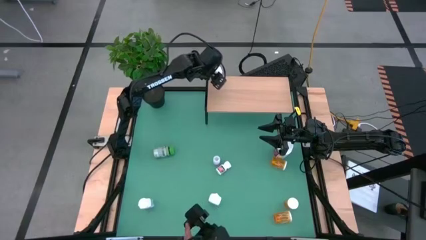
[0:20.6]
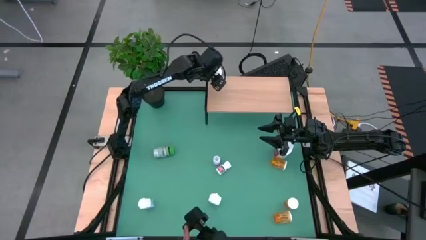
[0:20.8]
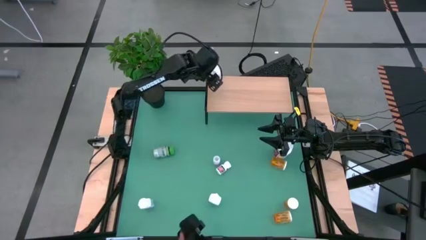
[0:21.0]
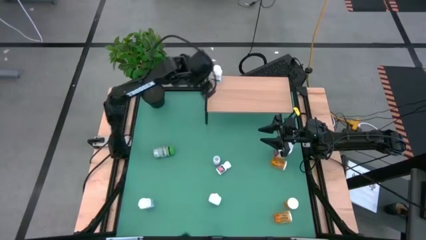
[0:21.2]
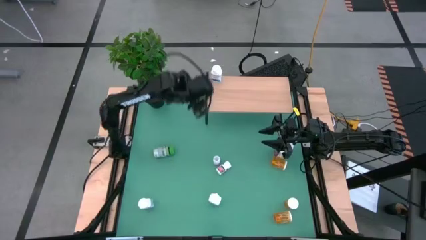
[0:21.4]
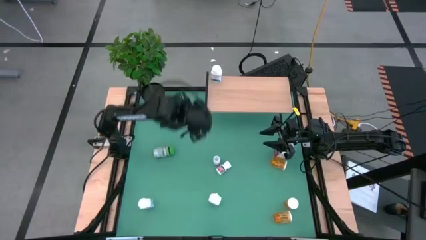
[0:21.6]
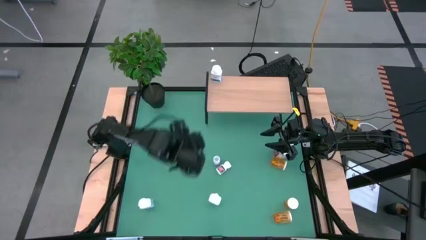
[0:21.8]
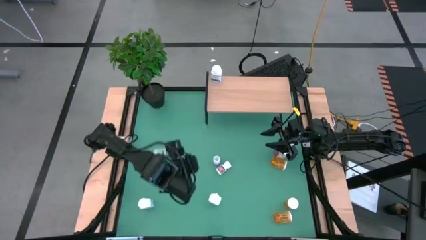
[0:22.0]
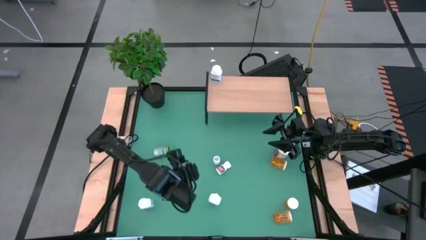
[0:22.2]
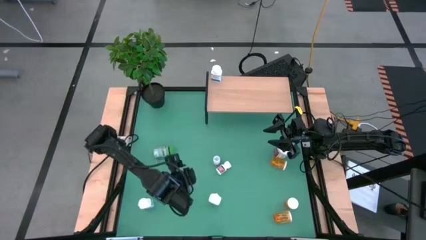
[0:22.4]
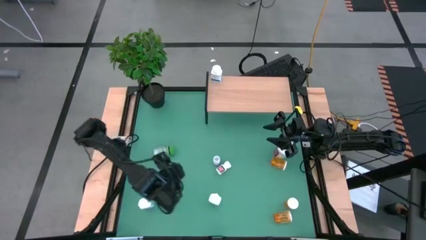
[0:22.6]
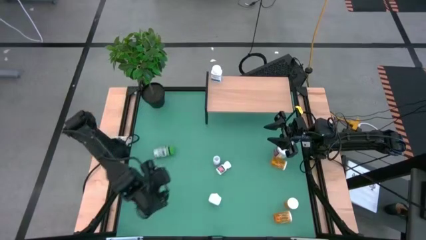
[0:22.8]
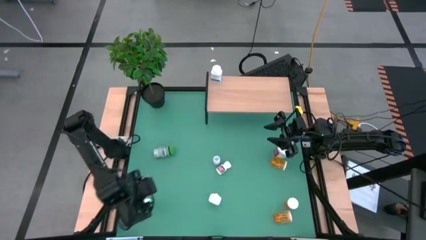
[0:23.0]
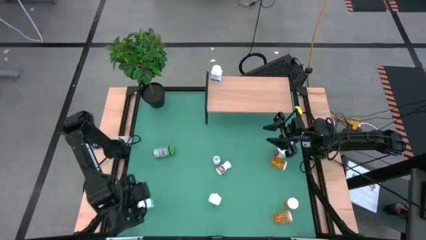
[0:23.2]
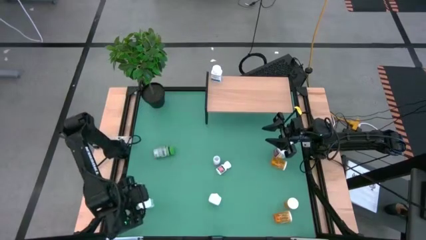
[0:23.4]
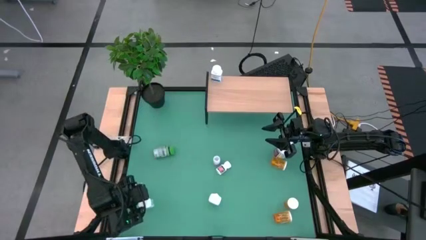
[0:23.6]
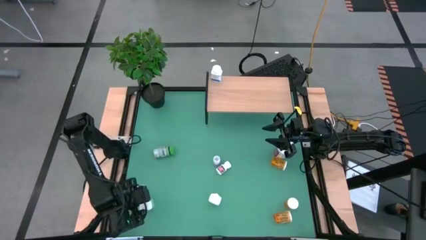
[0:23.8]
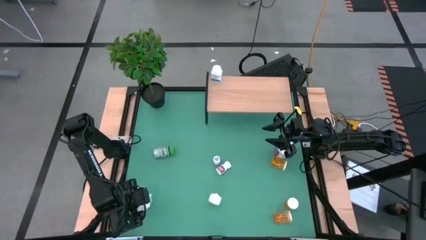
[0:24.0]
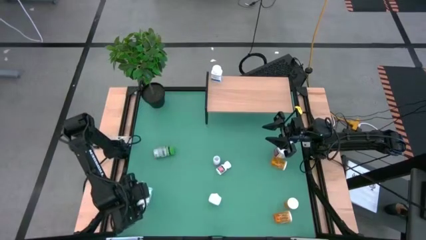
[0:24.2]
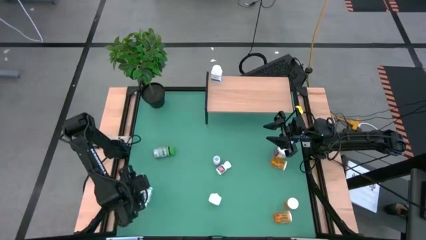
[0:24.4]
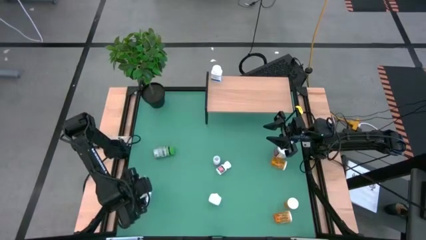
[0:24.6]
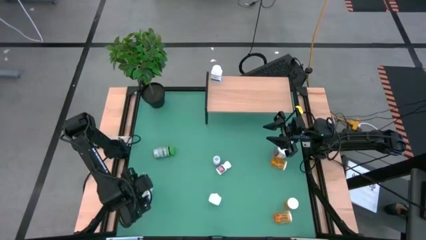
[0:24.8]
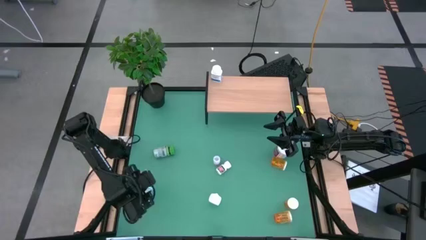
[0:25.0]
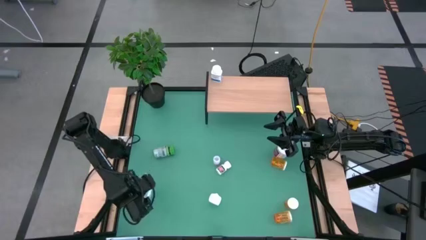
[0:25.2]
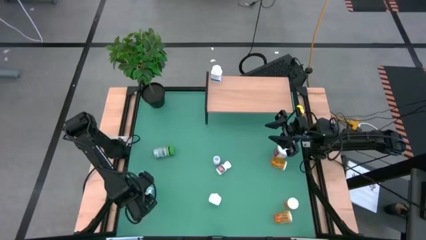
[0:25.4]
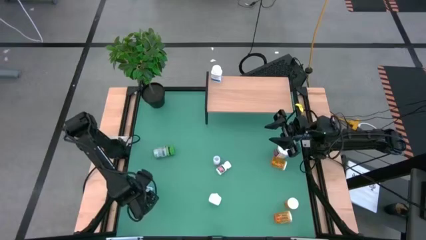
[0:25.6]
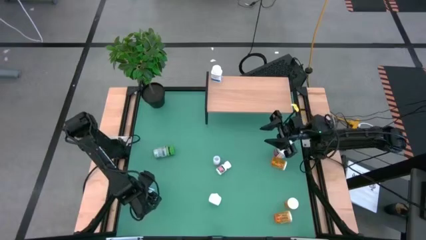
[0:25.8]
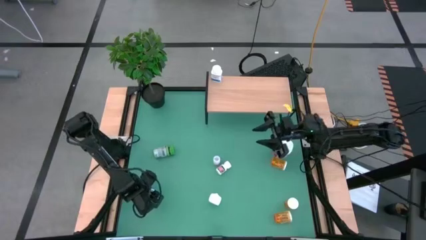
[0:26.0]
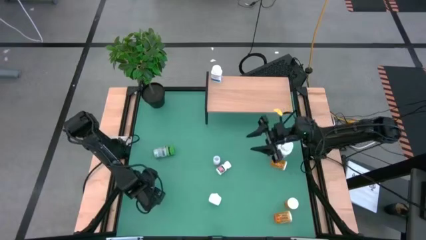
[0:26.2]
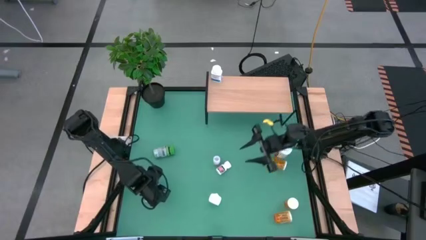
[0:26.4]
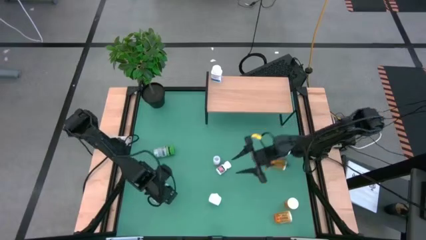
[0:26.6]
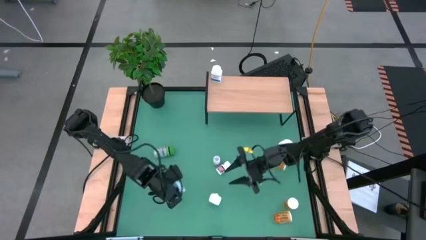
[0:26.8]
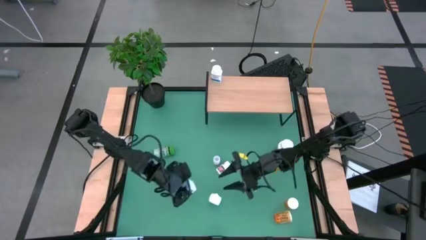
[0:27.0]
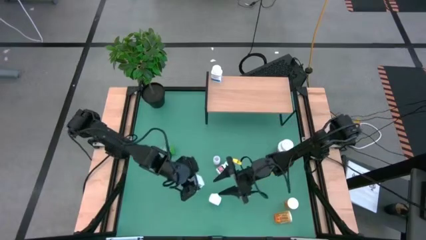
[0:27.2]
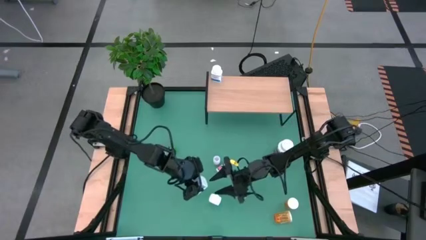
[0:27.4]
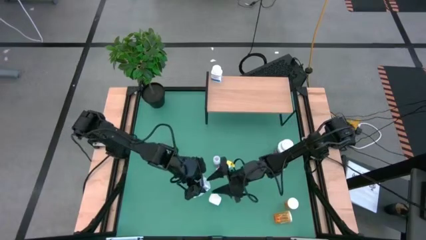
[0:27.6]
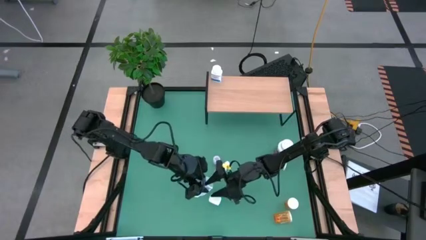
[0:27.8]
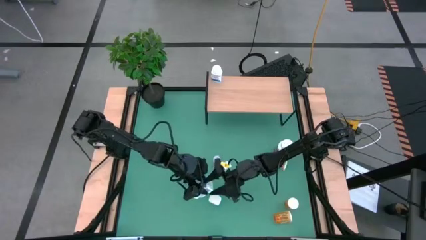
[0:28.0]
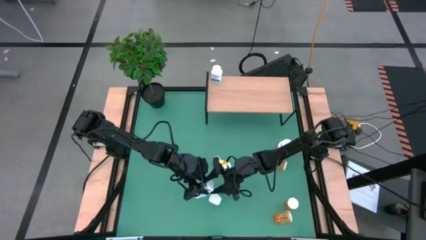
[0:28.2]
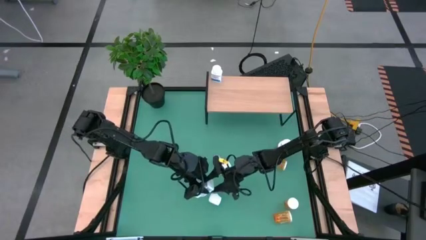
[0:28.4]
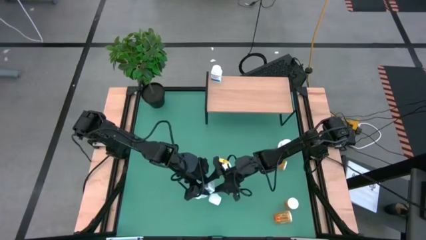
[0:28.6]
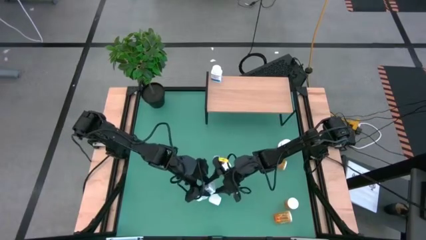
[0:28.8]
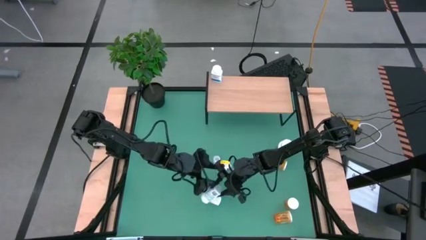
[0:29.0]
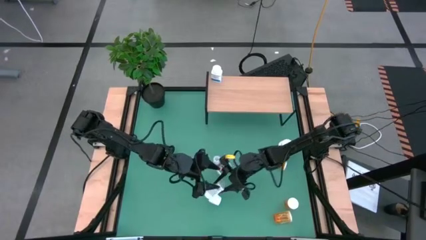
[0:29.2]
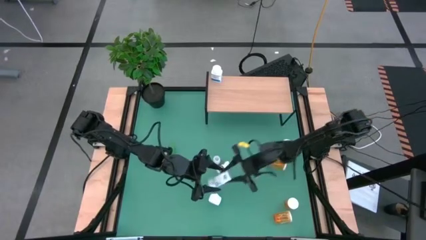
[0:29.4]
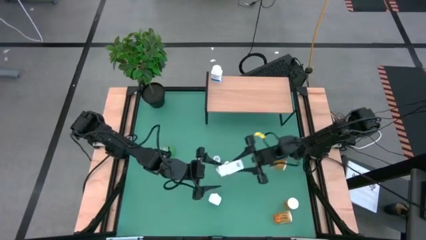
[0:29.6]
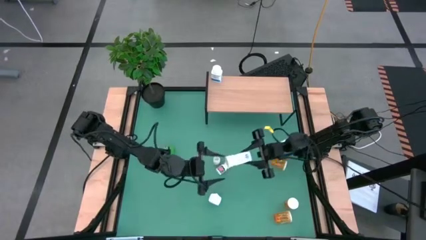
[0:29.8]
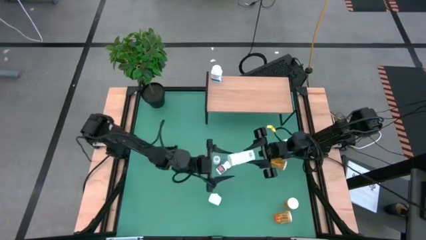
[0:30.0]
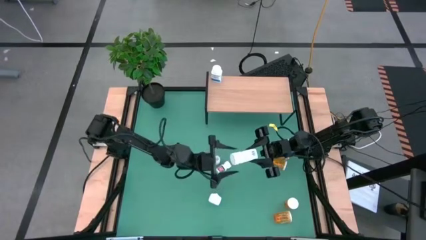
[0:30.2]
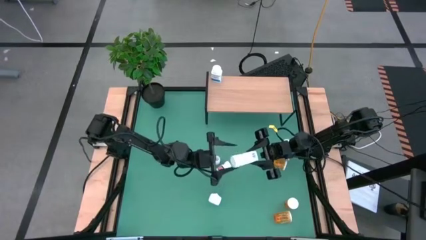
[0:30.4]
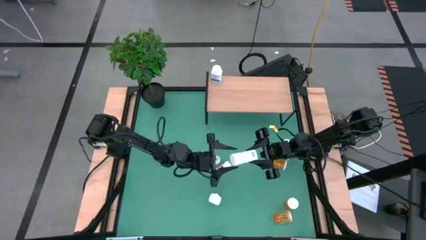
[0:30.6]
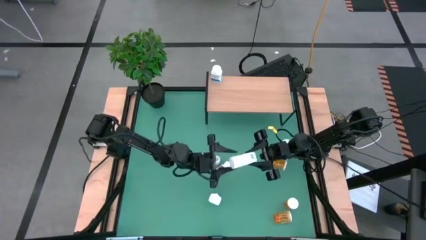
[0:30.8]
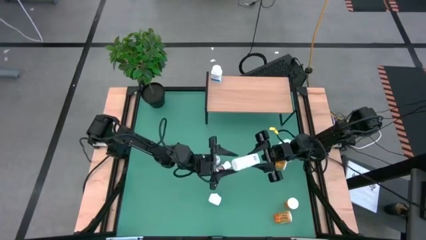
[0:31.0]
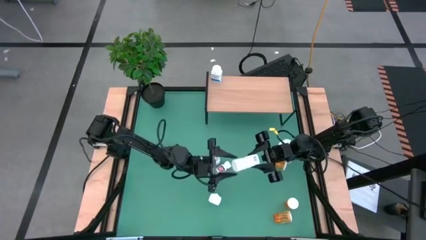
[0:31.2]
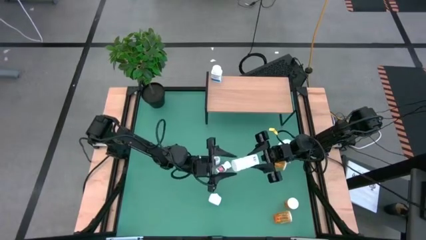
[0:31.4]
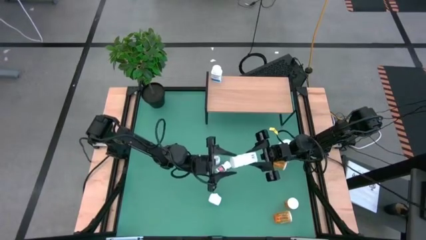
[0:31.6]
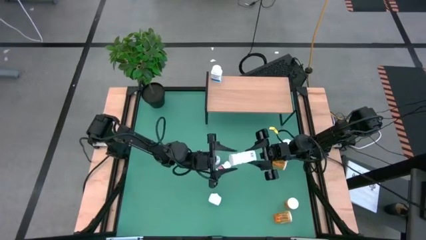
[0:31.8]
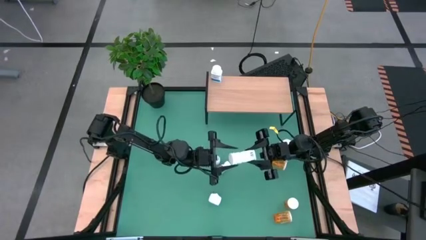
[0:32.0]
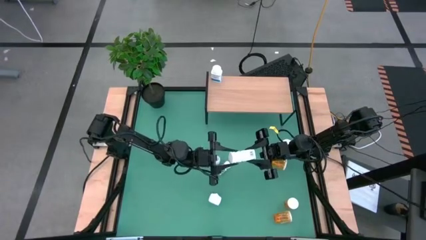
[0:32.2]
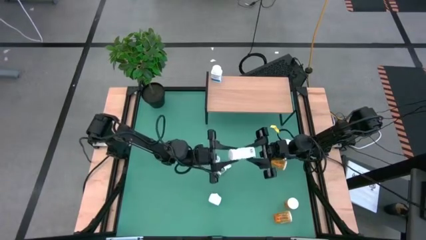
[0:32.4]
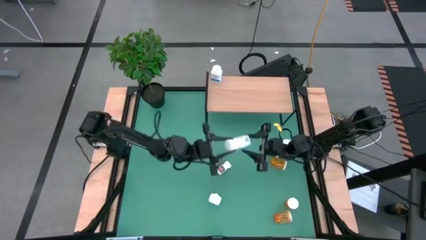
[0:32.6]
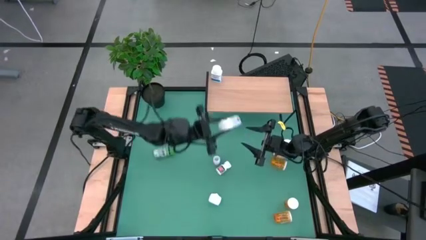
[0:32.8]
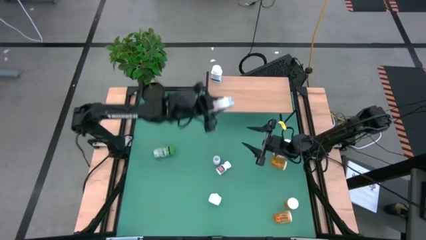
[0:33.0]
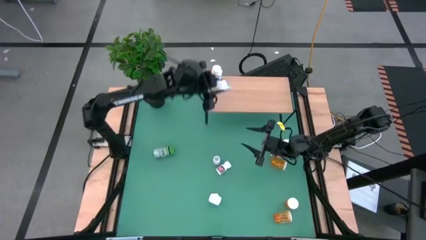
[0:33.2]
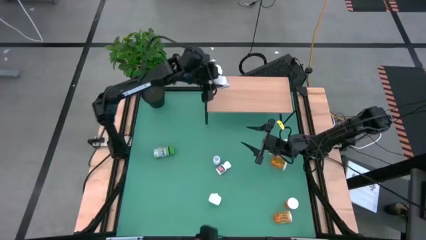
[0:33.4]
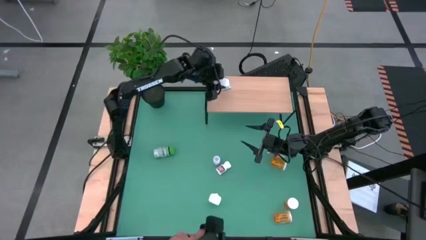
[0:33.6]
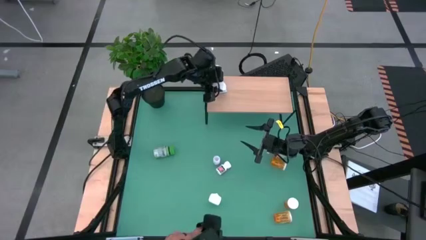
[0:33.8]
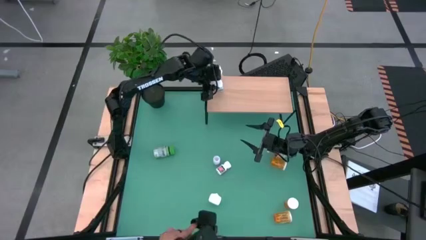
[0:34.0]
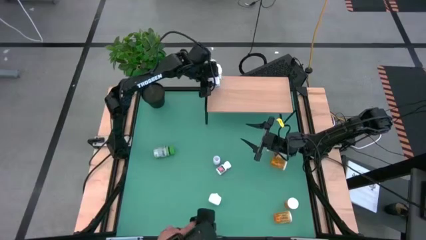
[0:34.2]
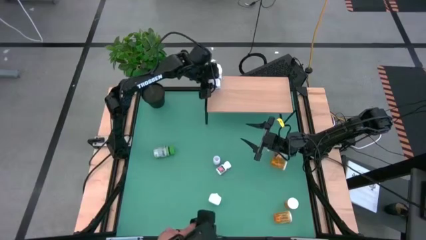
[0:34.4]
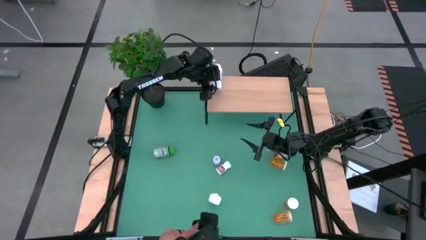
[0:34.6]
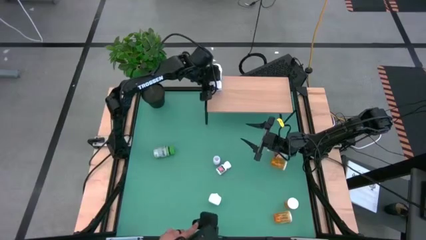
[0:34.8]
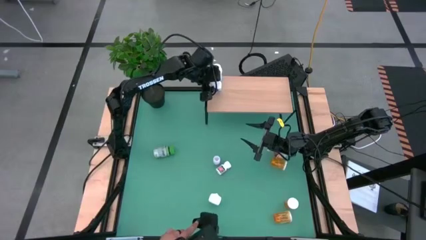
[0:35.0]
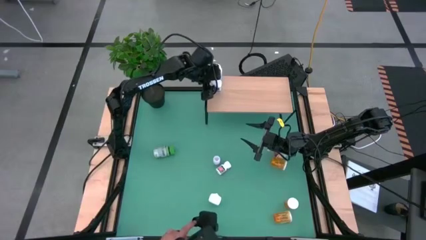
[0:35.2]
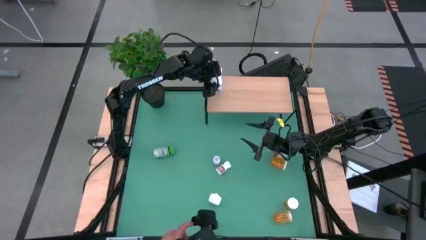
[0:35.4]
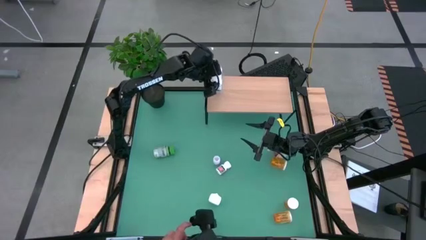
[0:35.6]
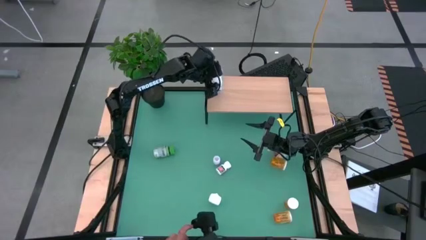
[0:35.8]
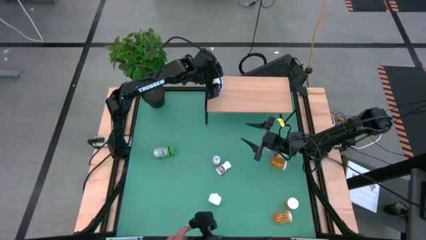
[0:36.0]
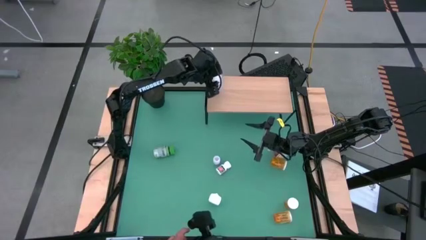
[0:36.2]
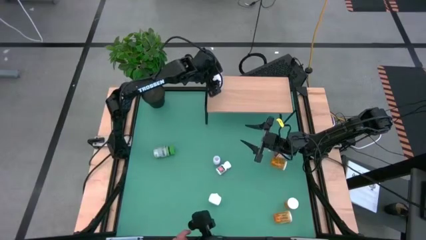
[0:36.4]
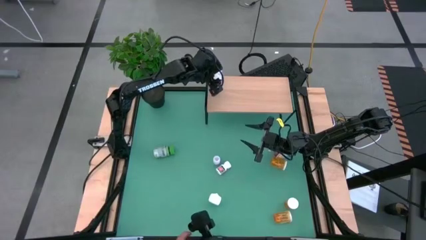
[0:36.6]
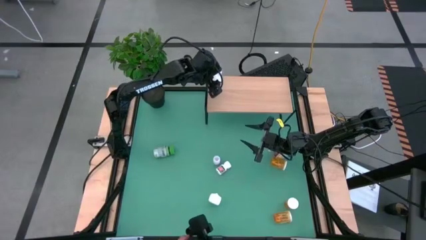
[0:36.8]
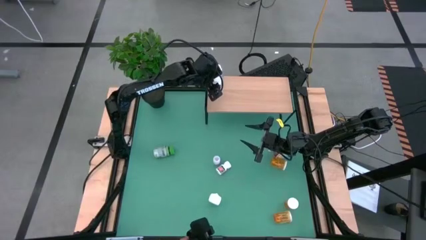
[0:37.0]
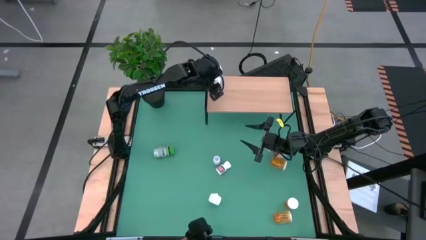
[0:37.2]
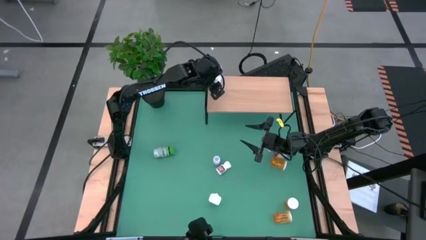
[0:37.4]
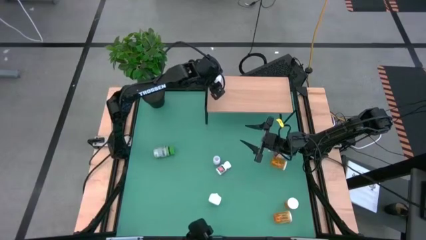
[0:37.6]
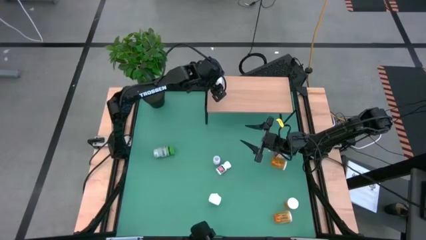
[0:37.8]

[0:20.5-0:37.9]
Task: Pick and place medicine bottles onto shelf by color
Align the left white and blue pill bottle with the other blue pill bottle on the shelf
